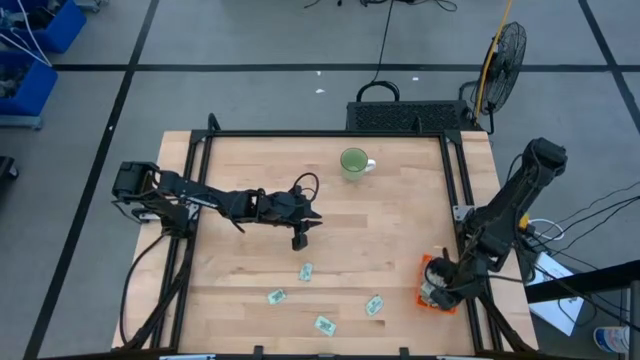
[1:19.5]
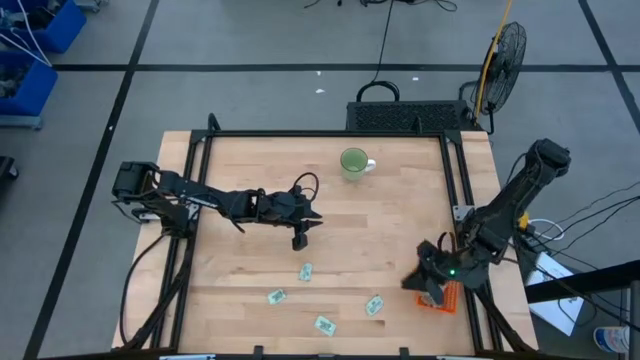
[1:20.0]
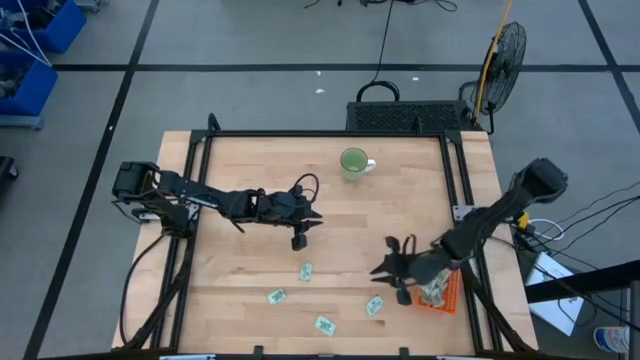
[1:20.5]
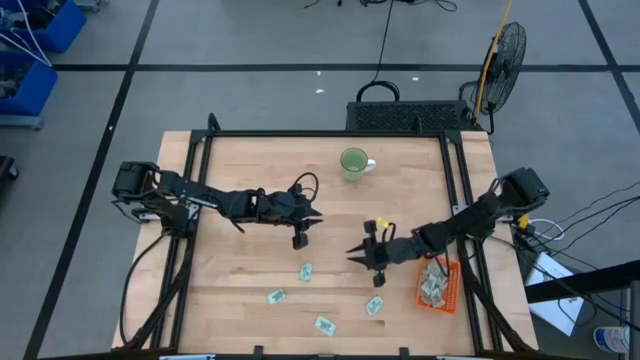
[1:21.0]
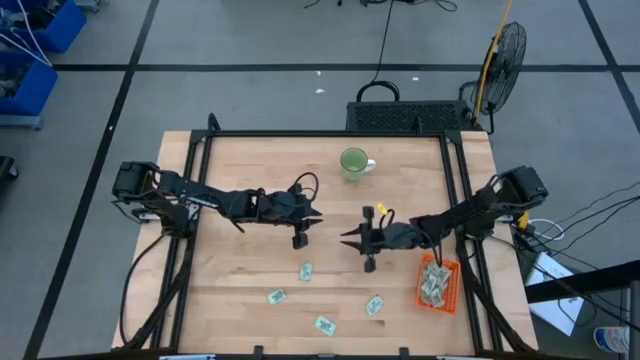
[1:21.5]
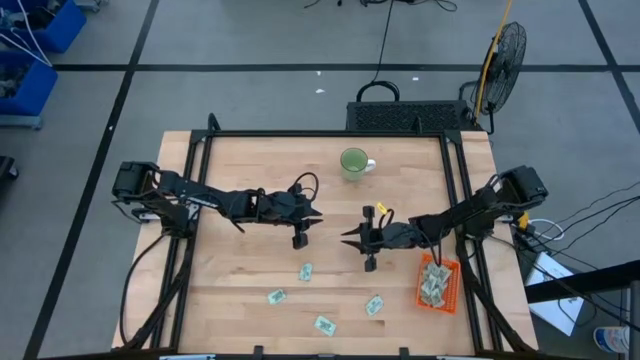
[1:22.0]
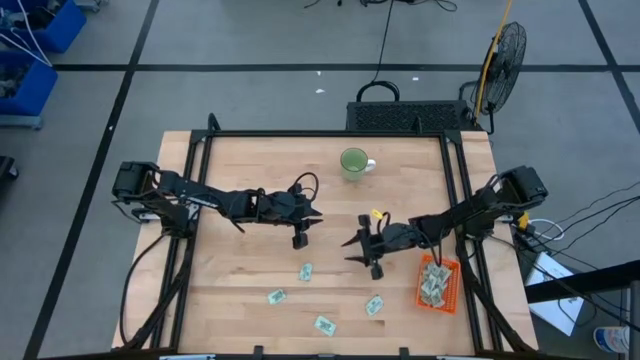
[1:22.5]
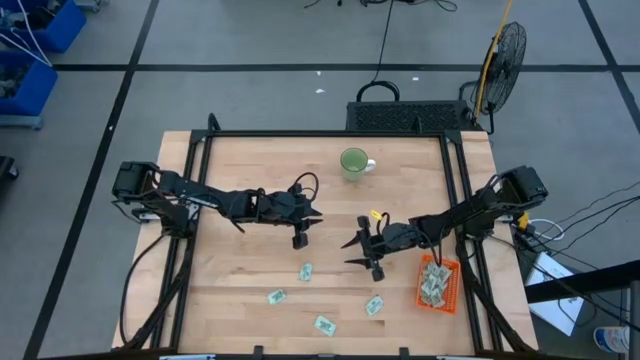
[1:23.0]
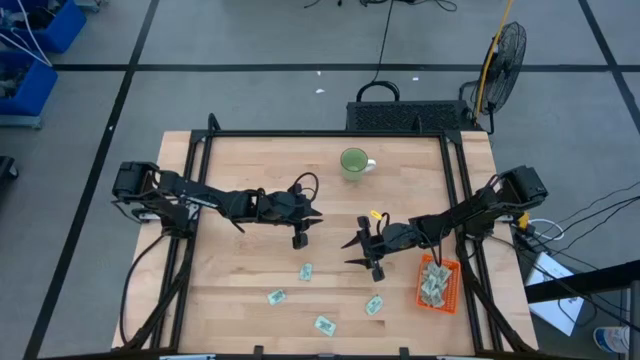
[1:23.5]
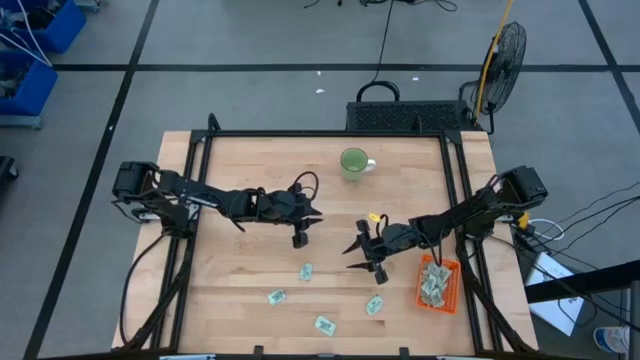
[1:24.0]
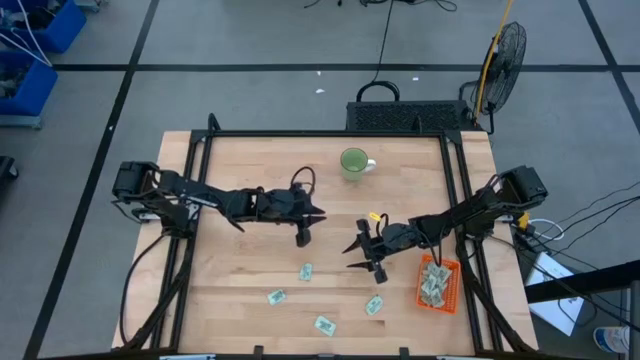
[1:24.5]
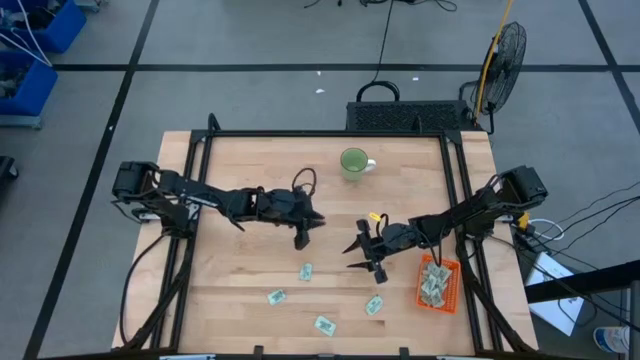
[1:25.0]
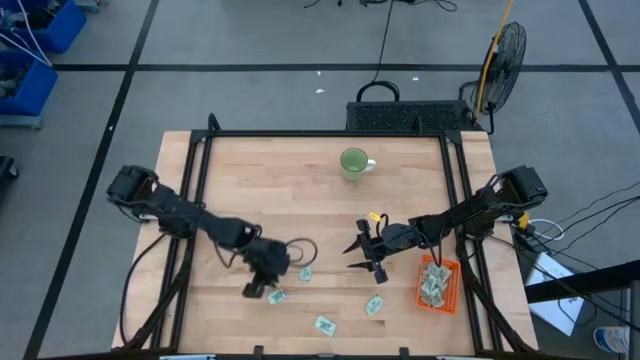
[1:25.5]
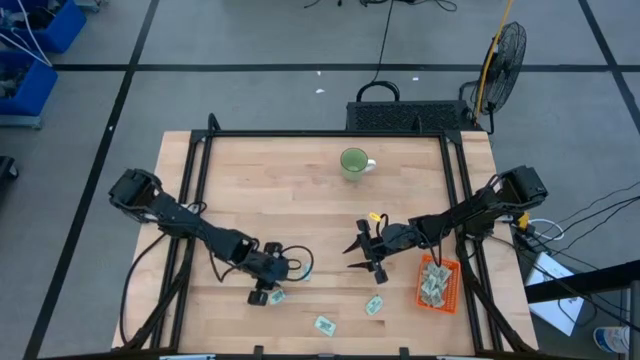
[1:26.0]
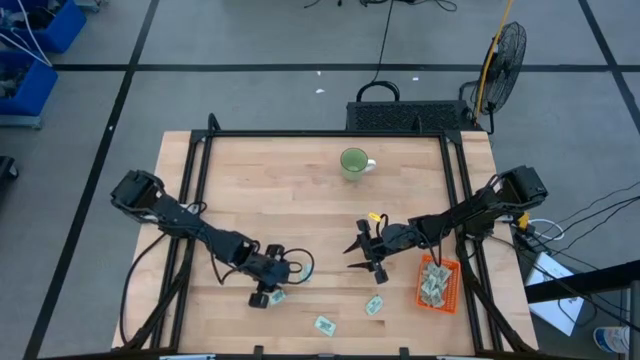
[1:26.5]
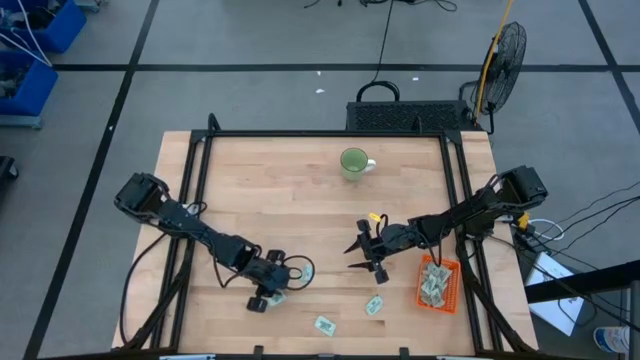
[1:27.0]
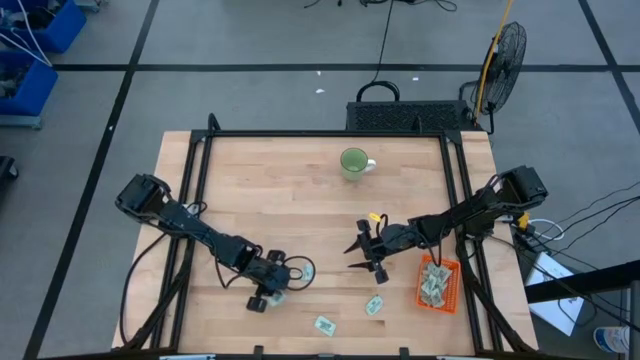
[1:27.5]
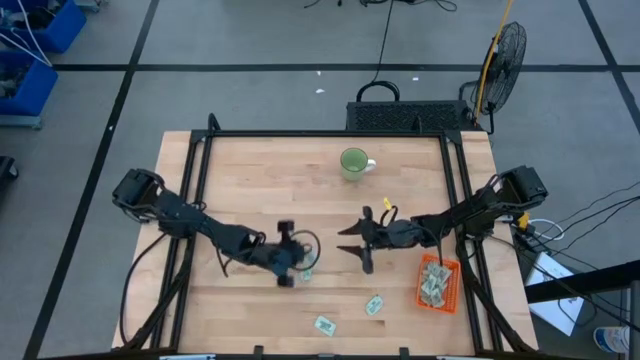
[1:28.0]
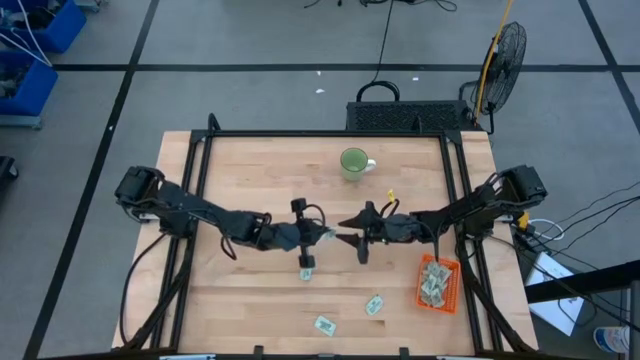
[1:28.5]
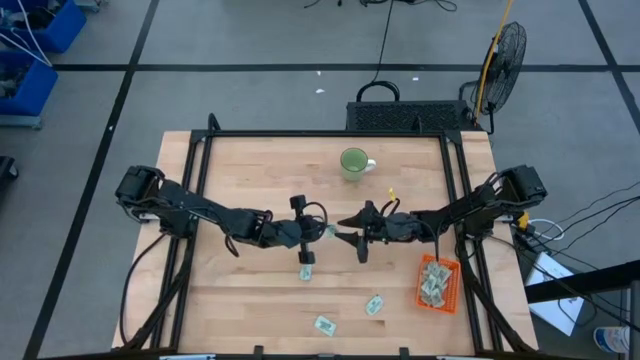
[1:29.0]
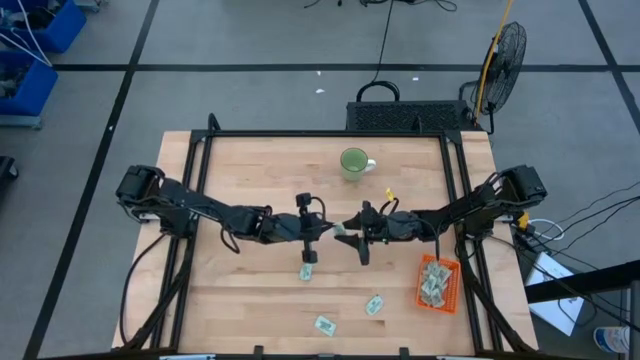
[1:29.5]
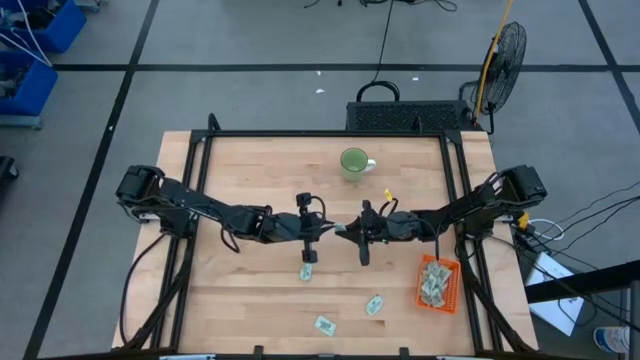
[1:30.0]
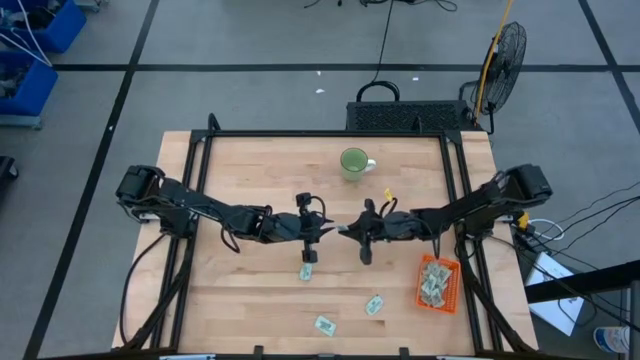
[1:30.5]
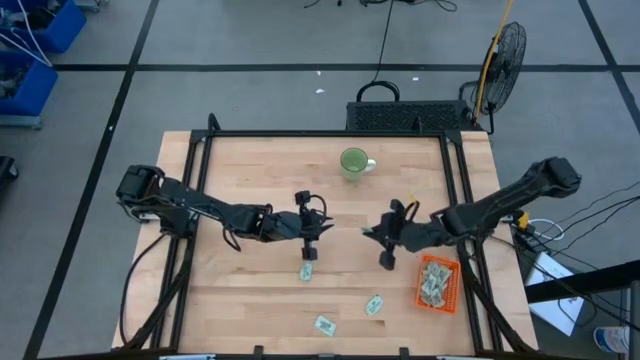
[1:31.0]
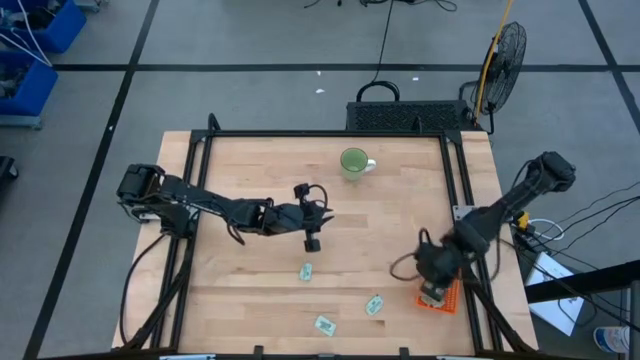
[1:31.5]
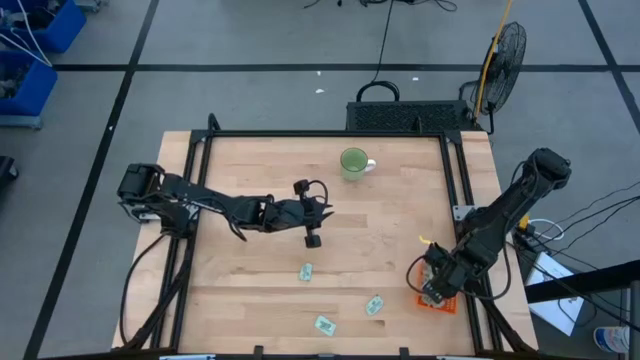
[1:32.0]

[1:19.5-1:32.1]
Task: Pick and place Stevia / Truvia into bins
Put the stevia packet into the orange bin

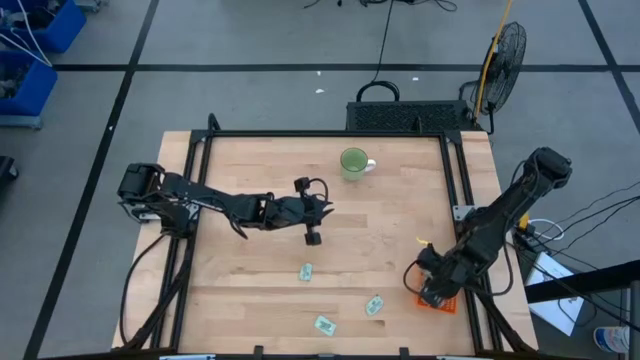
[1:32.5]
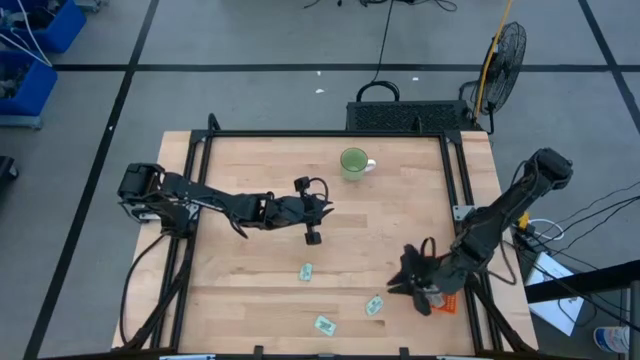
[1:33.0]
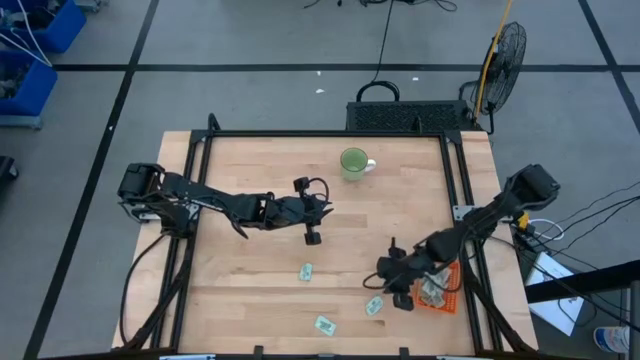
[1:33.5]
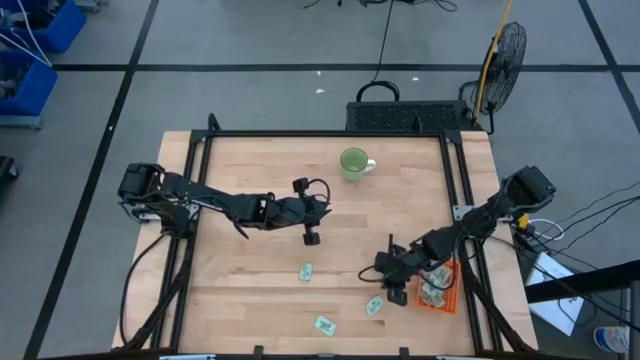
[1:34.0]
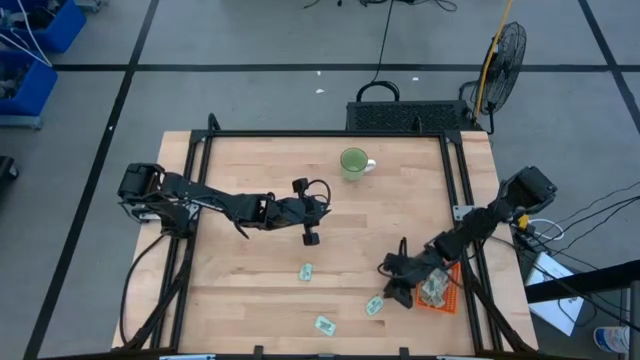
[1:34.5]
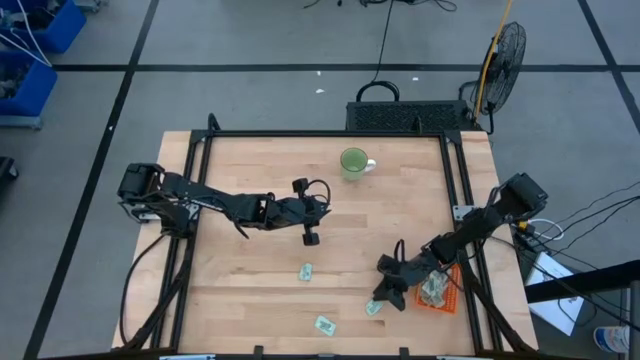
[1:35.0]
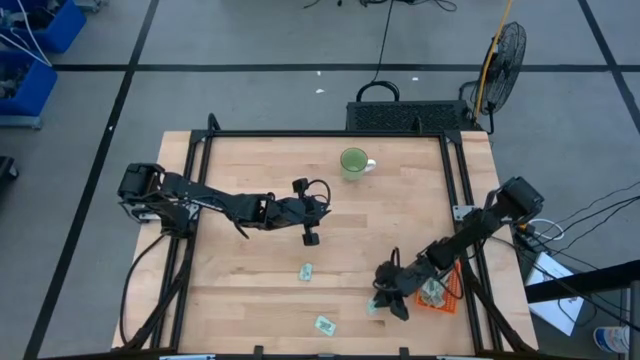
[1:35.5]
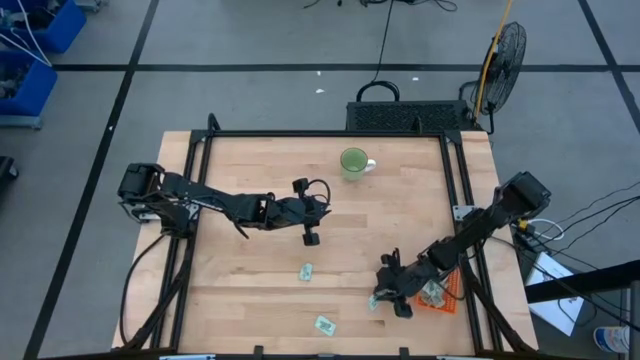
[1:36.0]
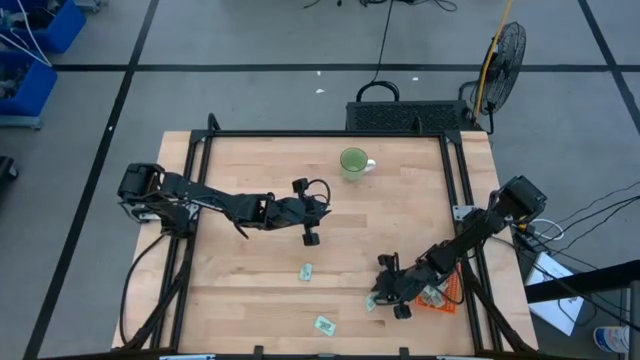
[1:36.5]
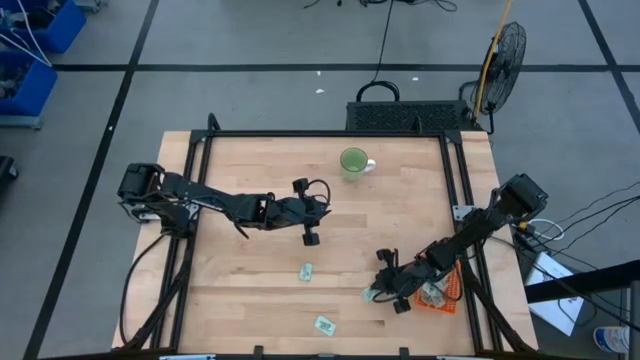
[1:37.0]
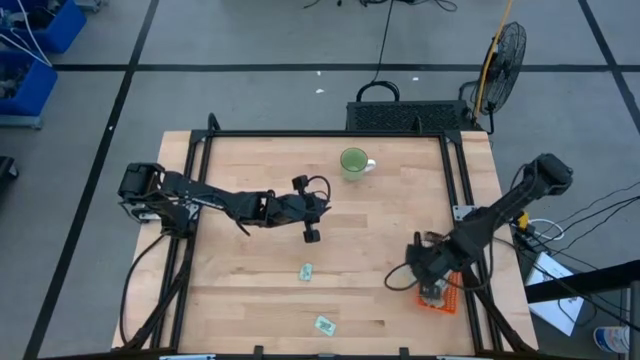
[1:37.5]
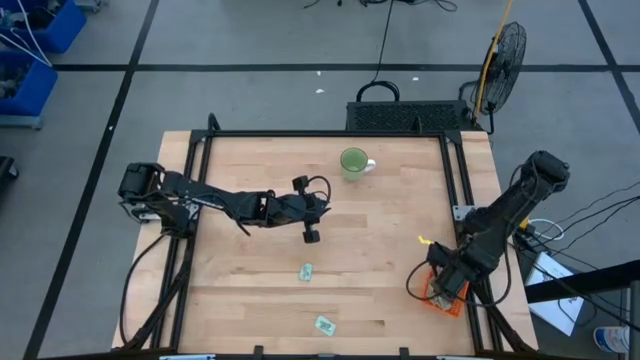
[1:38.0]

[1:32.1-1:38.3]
Put the right stevia packet into the orange bin

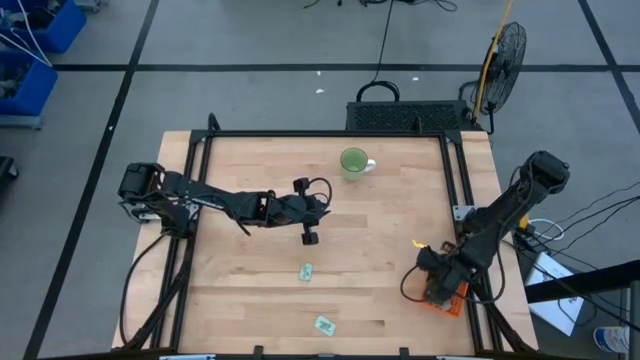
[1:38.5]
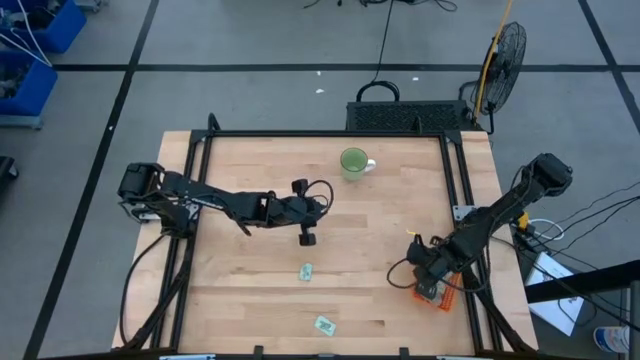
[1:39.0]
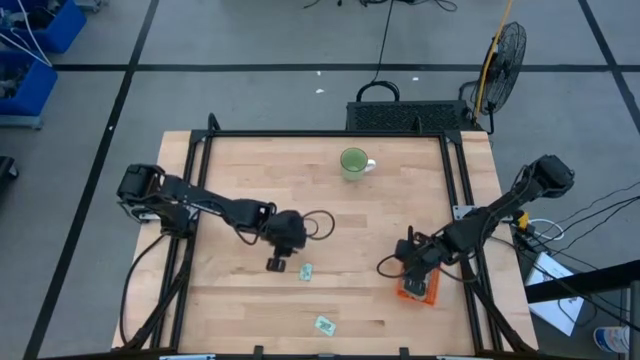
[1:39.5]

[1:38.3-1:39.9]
Move the orange bin to the left of the table

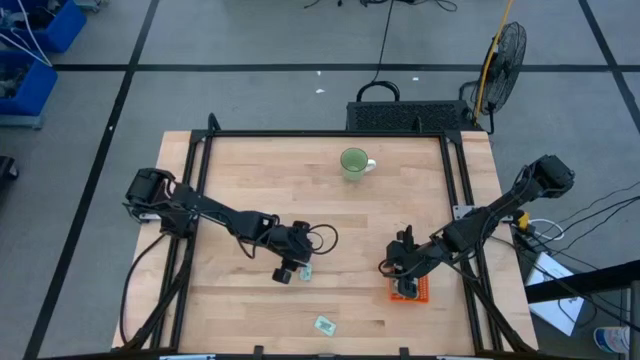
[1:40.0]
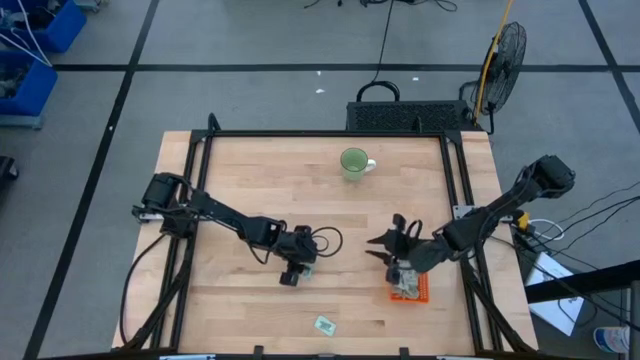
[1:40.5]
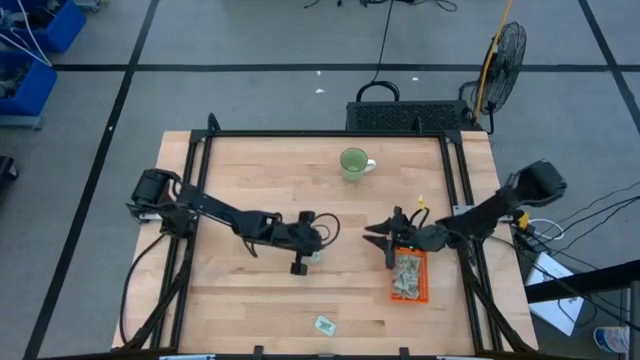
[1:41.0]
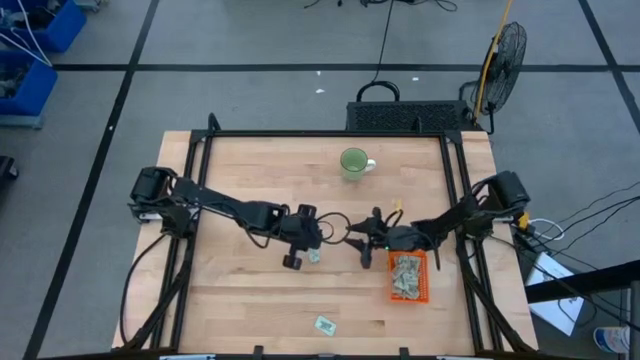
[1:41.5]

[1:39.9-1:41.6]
Put the top stevia packet into the orange bin
